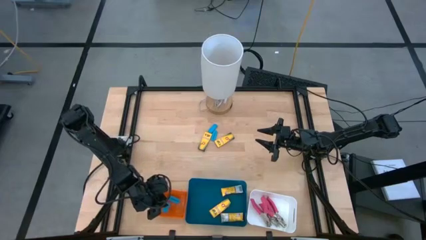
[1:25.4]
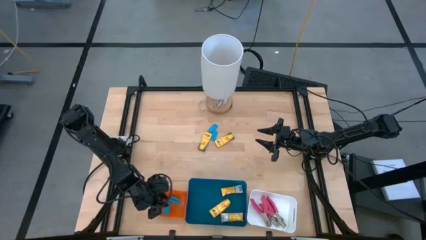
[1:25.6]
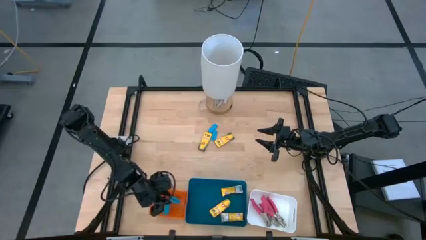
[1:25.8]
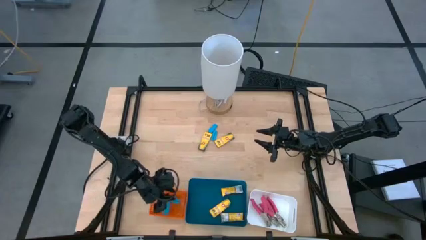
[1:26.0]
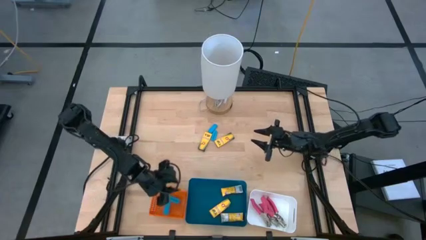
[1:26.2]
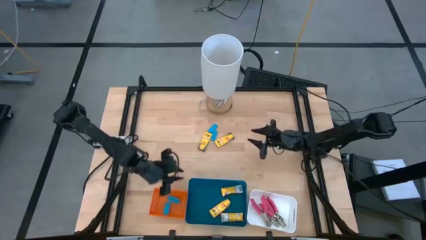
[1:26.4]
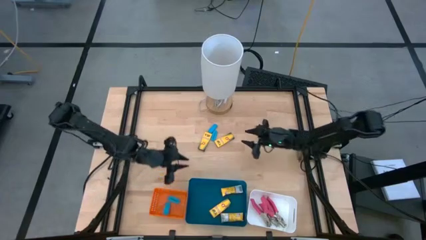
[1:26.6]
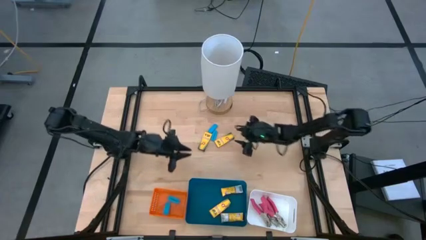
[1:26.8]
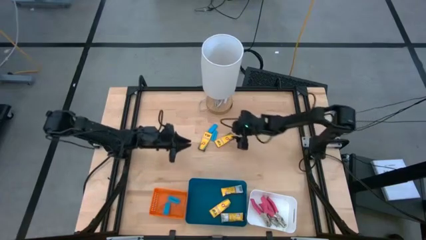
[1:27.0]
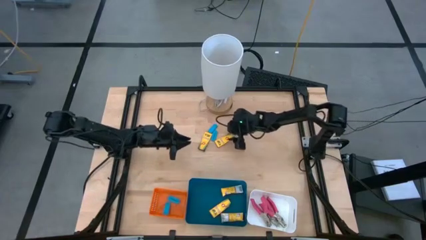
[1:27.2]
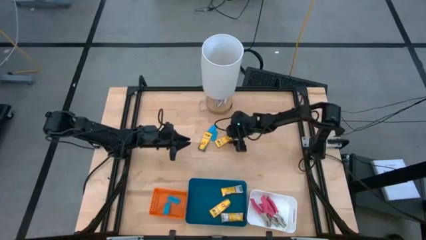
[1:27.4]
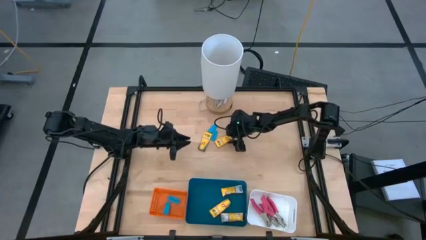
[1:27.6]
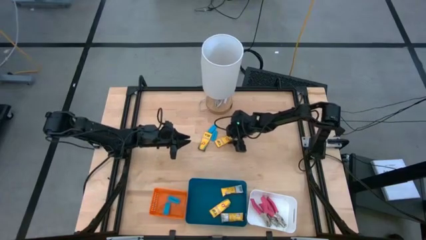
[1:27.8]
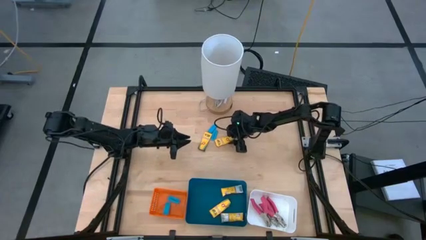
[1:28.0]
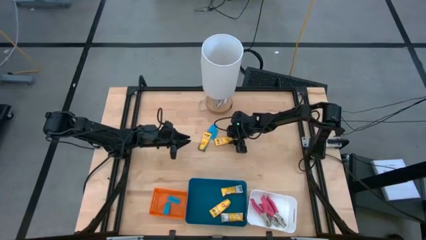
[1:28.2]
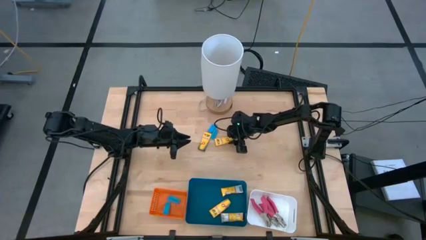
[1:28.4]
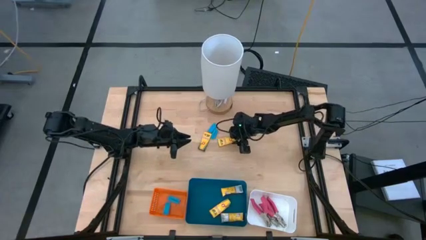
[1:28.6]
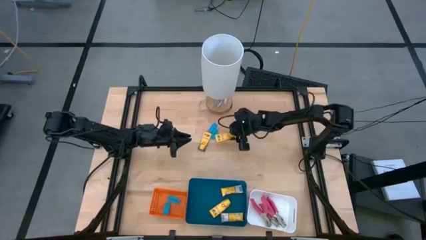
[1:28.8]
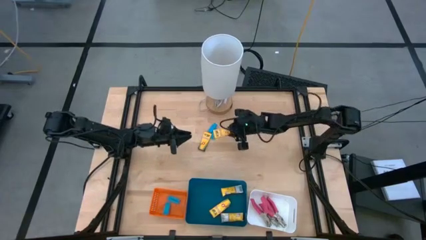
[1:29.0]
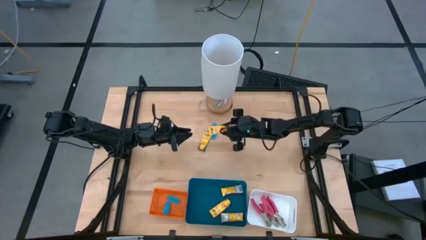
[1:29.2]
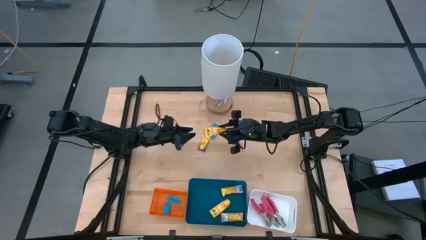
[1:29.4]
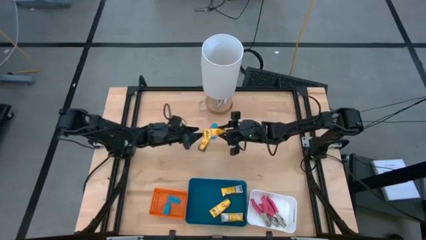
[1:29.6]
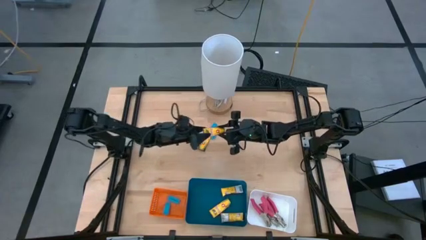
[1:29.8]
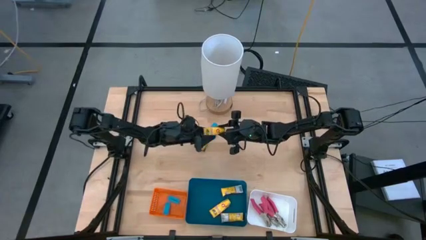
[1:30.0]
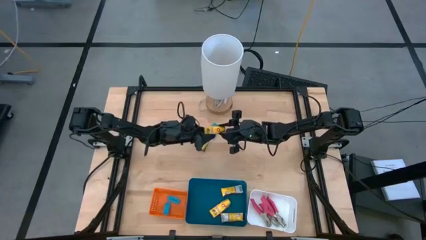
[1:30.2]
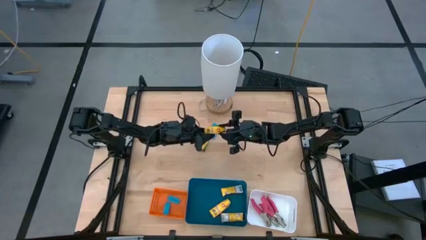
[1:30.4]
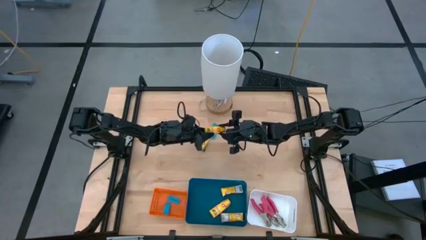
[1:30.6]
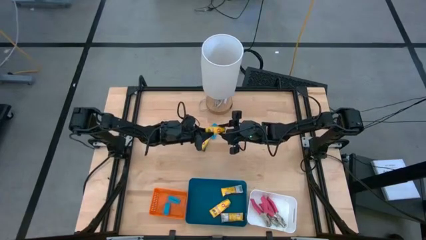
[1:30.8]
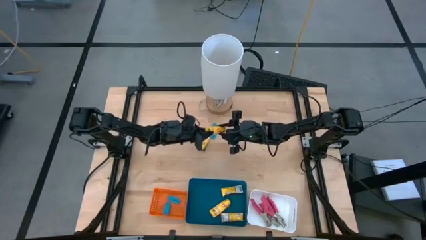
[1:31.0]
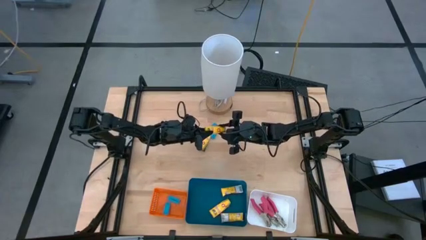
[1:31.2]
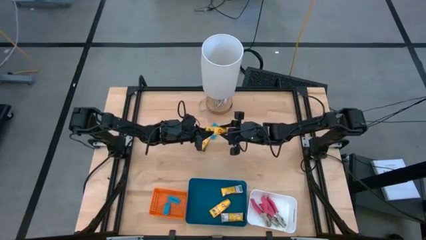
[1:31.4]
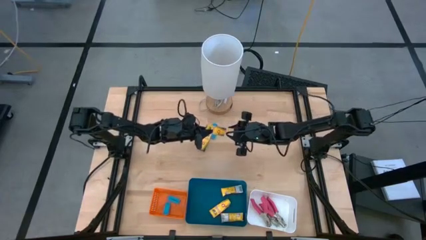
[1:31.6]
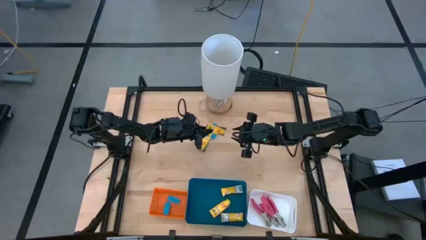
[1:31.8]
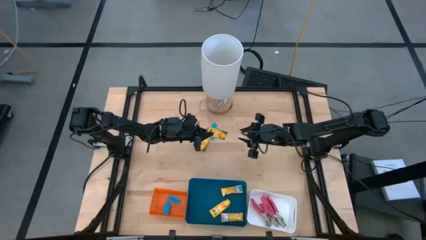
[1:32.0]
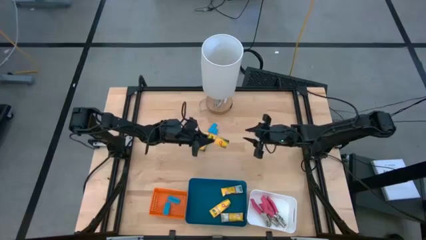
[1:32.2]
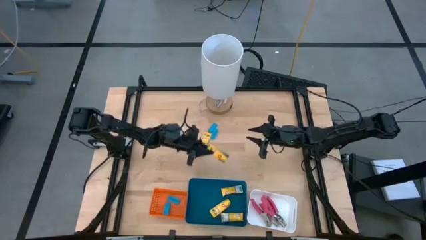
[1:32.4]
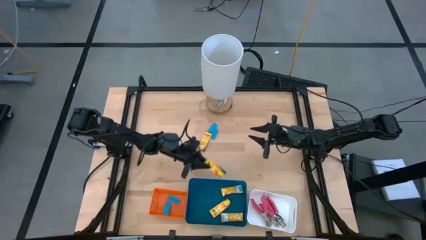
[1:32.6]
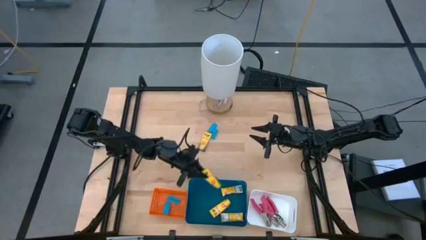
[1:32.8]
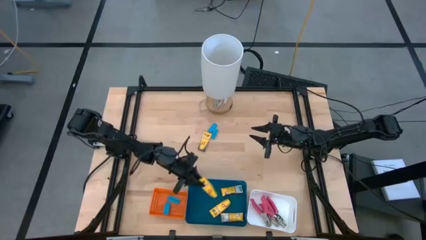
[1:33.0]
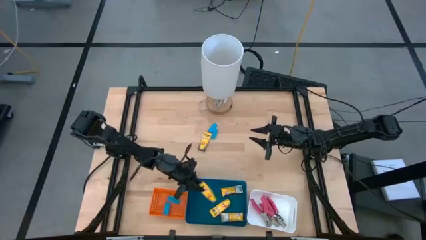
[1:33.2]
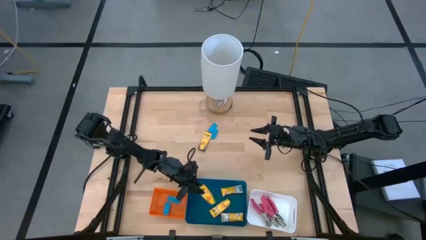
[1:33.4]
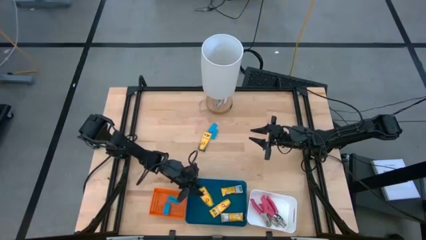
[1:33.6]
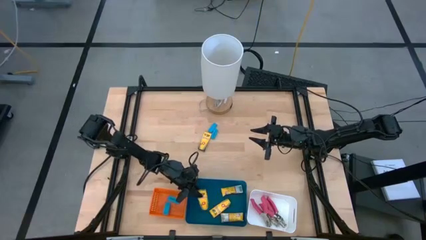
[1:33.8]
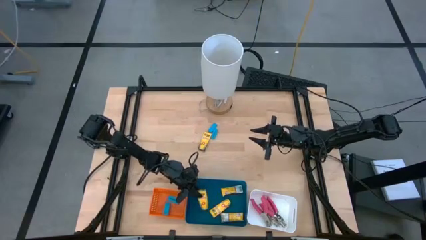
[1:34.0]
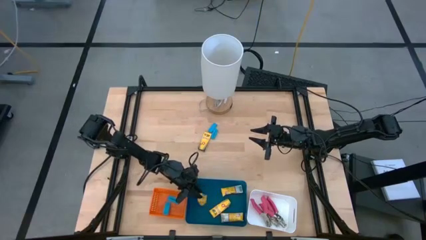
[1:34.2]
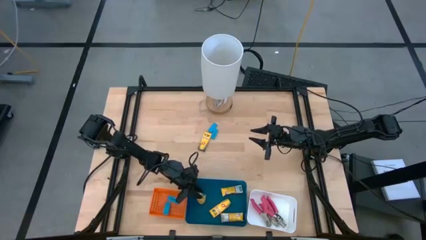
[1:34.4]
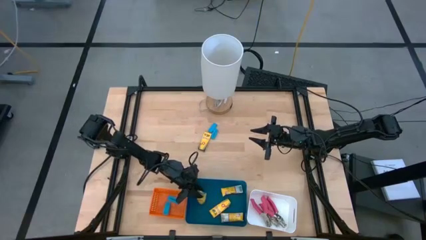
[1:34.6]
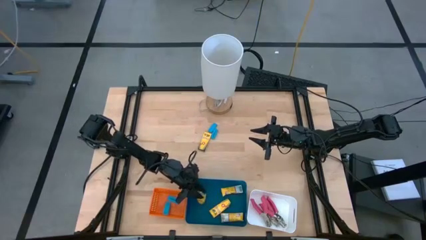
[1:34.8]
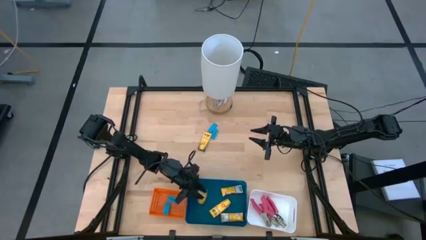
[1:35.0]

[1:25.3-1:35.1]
Task: Pick & Place School Supplies
Put the yellow crayon box into the blue bin

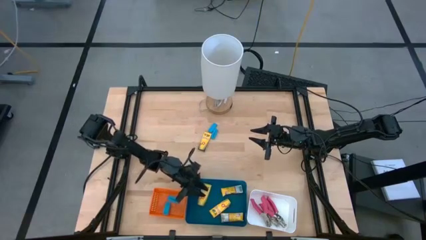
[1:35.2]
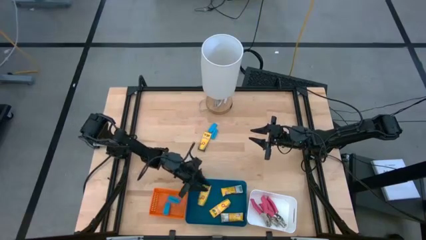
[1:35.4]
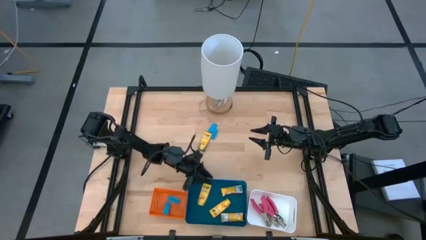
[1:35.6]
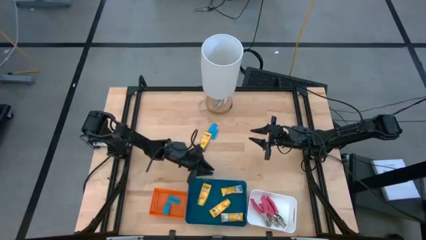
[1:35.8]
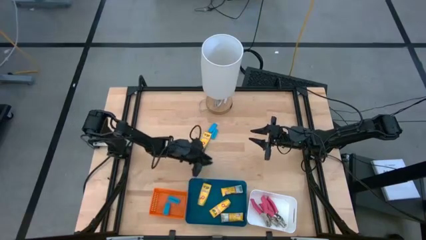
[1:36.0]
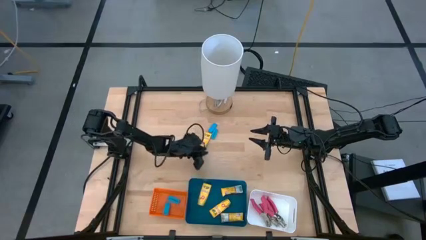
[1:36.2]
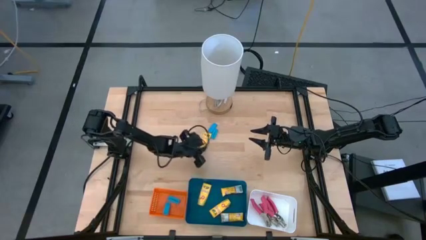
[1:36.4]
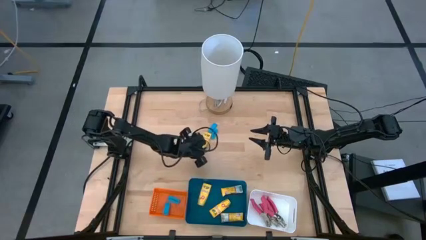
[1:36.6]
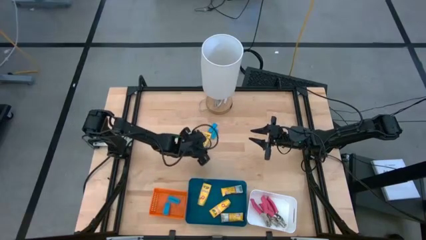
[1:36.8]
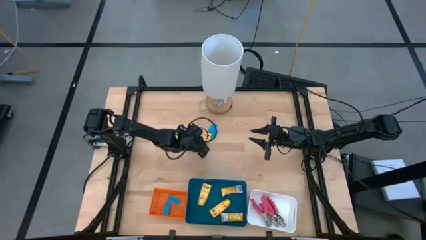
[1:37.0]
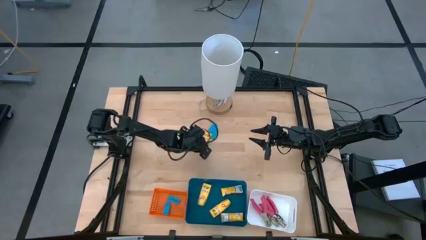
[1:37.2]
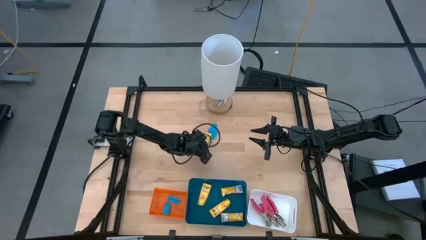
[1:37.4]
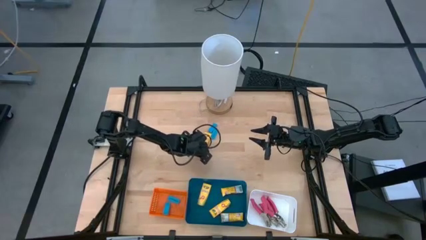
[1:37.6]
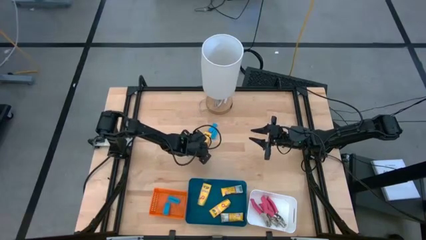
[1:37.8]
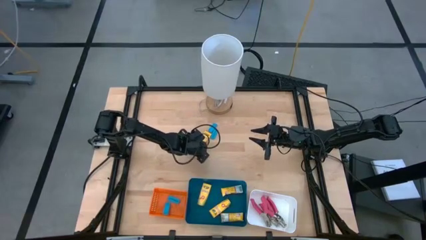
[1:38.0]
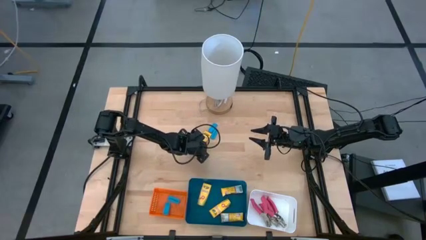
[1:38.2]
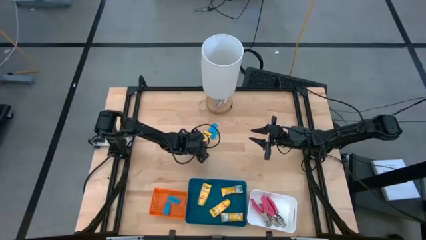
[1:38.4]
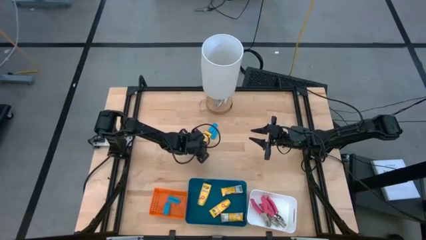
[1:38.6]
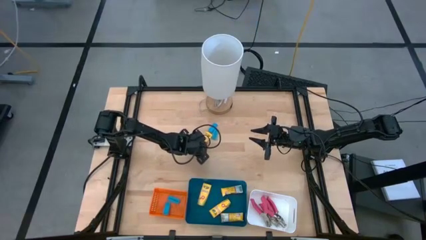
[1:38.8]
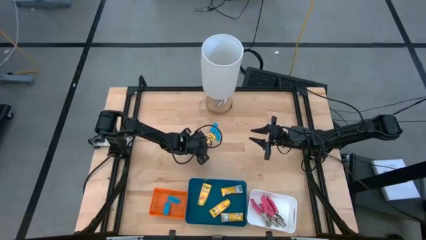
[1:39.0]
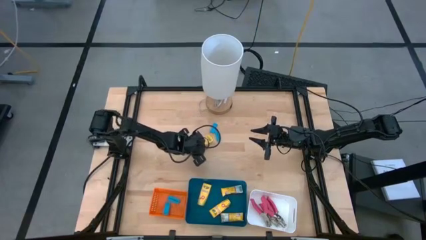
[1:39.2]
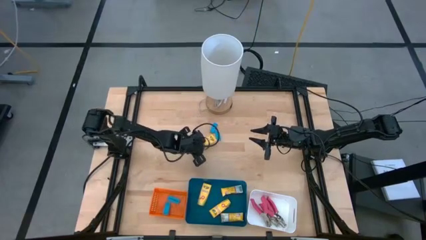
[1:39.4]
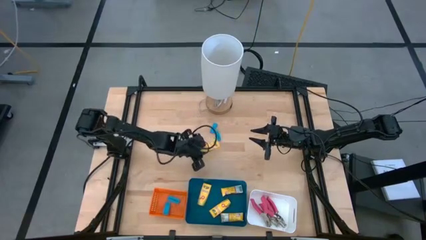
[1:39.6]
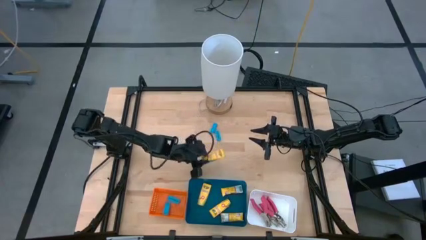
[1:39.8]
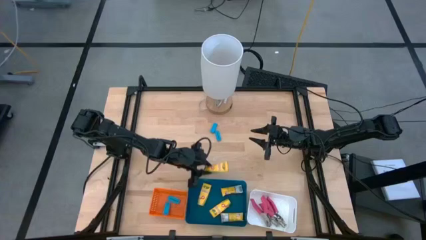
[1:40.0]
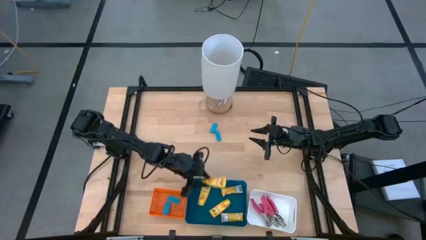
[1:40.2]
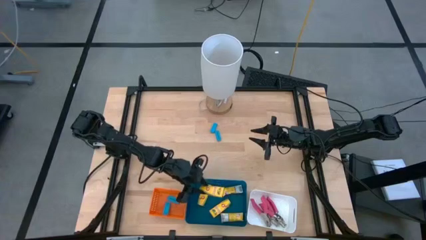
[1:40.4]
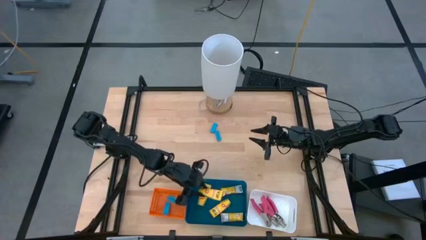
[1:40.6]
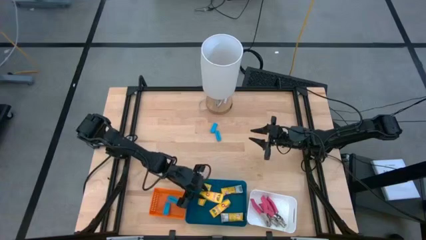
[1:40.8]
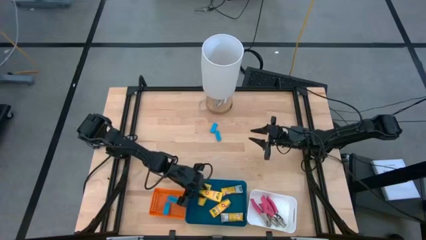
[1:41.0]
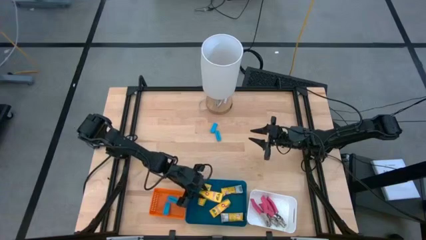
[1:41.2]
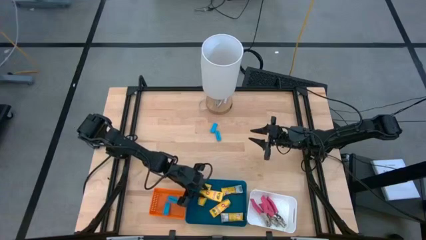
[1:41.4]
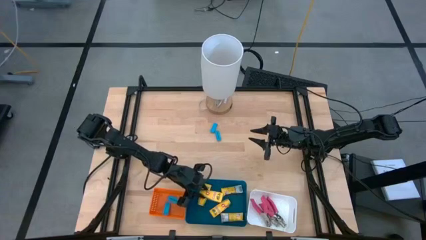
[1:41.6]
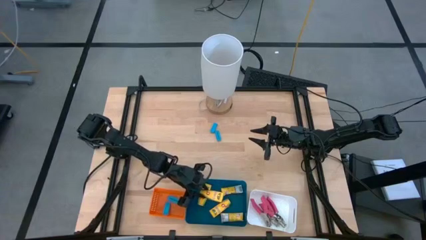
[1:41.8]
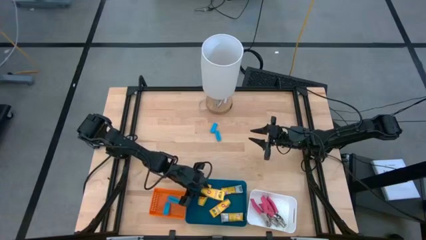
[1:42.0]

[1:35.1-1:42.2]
Put the yellow crayon box into the blue bin
